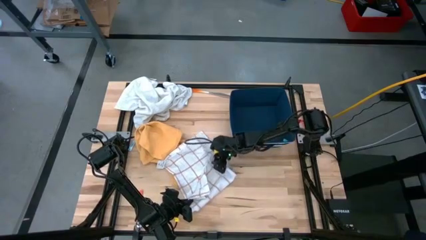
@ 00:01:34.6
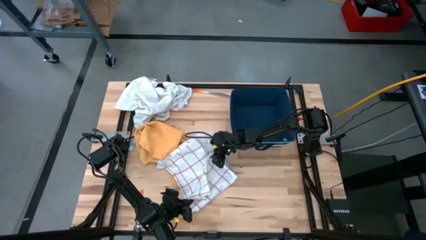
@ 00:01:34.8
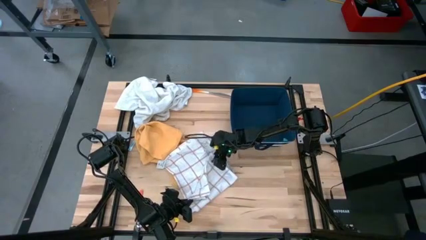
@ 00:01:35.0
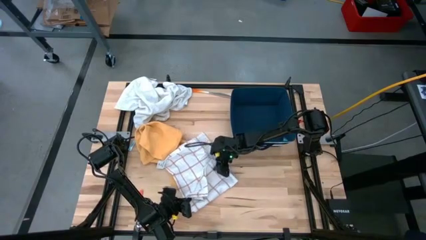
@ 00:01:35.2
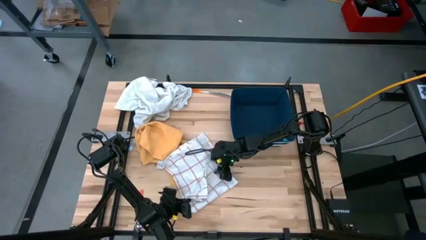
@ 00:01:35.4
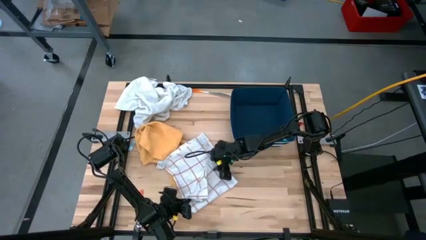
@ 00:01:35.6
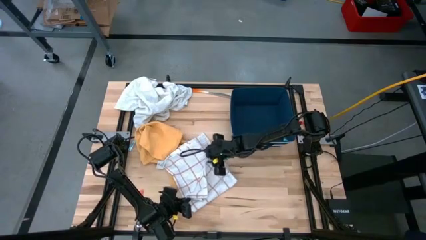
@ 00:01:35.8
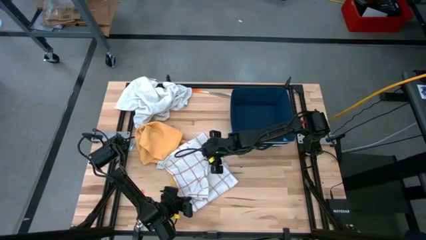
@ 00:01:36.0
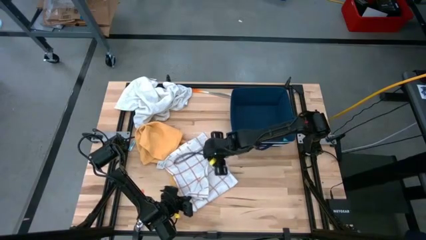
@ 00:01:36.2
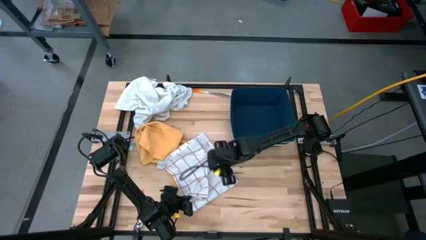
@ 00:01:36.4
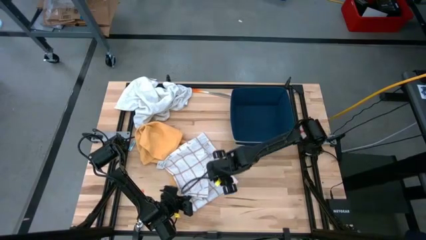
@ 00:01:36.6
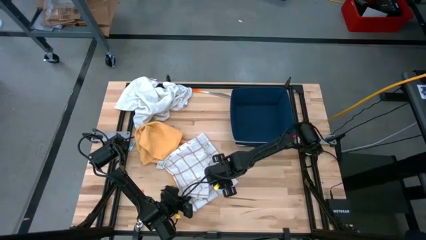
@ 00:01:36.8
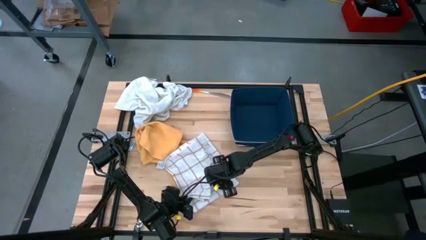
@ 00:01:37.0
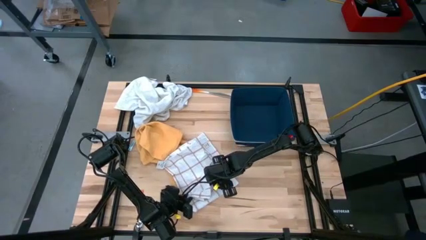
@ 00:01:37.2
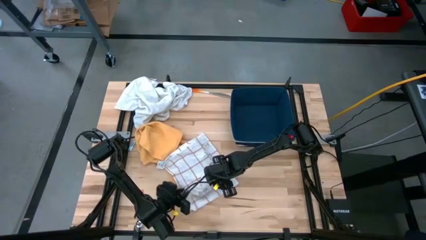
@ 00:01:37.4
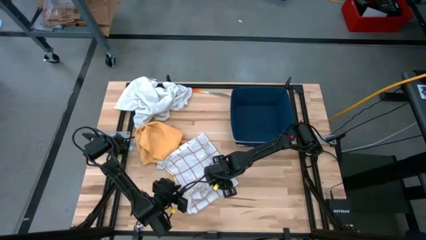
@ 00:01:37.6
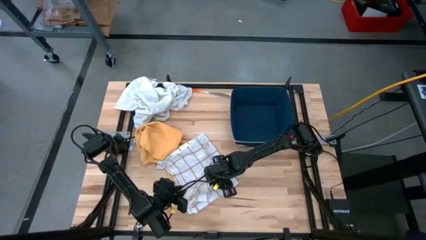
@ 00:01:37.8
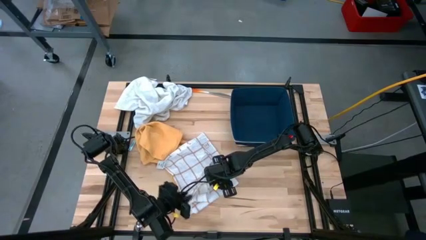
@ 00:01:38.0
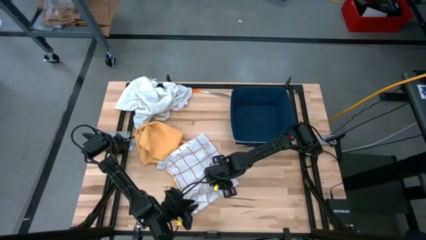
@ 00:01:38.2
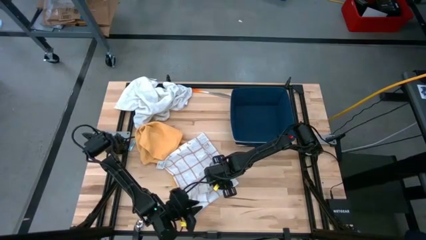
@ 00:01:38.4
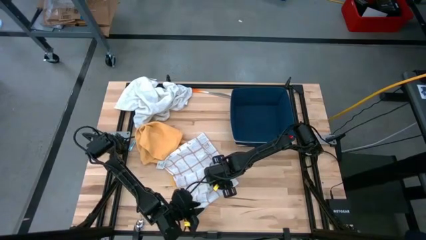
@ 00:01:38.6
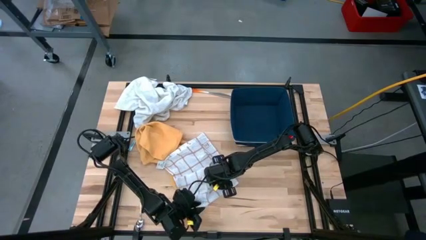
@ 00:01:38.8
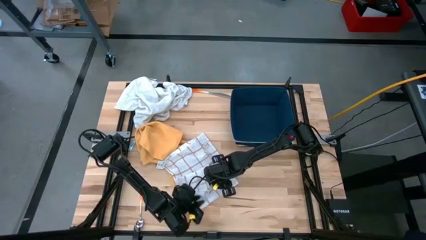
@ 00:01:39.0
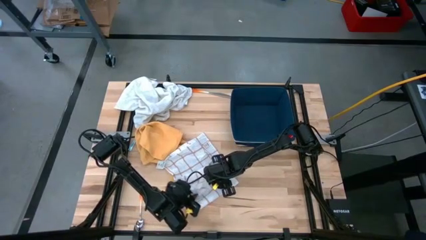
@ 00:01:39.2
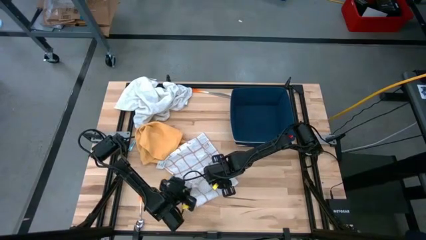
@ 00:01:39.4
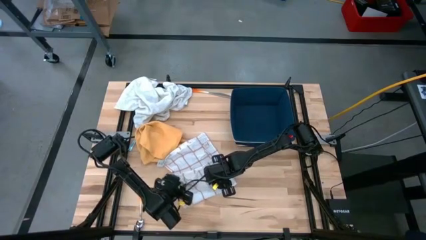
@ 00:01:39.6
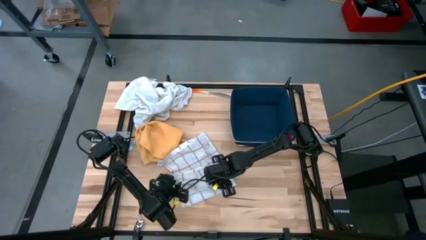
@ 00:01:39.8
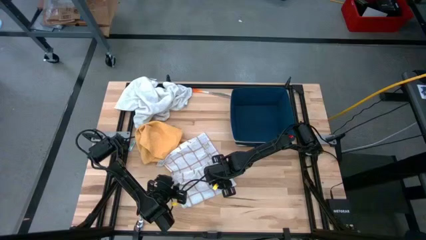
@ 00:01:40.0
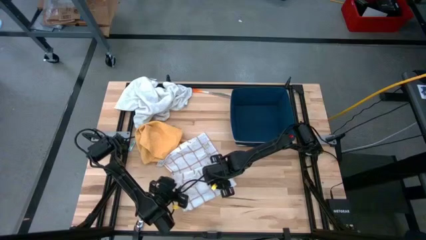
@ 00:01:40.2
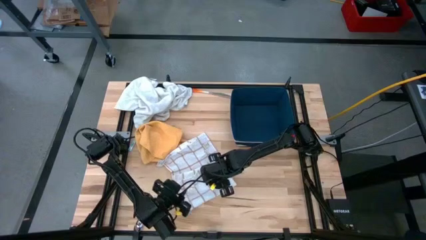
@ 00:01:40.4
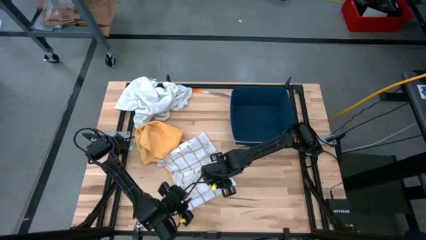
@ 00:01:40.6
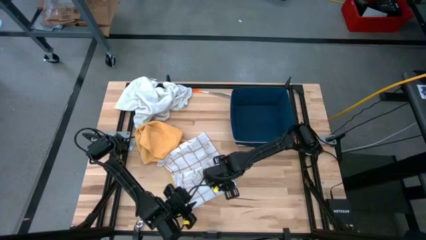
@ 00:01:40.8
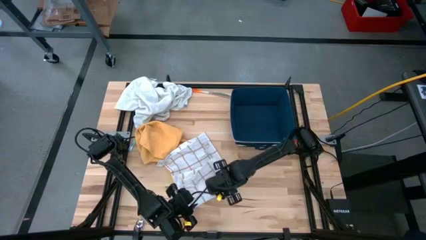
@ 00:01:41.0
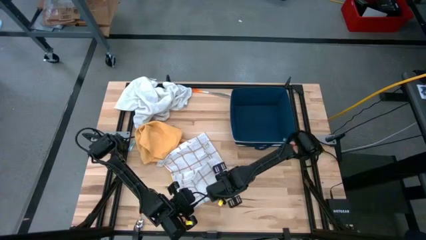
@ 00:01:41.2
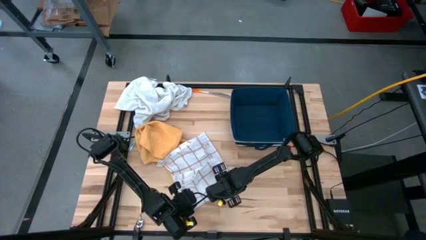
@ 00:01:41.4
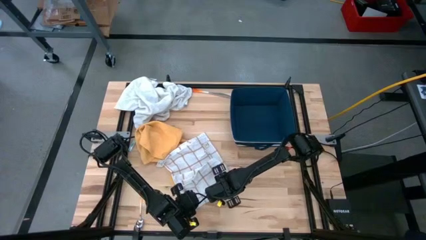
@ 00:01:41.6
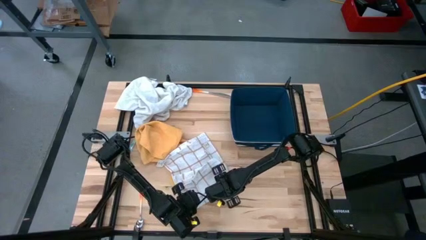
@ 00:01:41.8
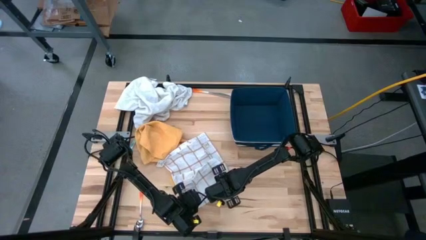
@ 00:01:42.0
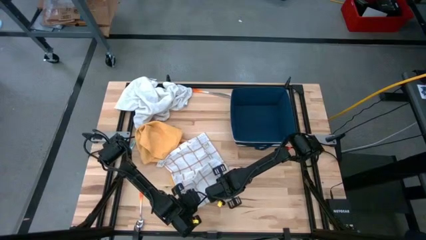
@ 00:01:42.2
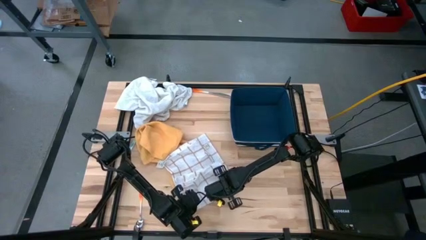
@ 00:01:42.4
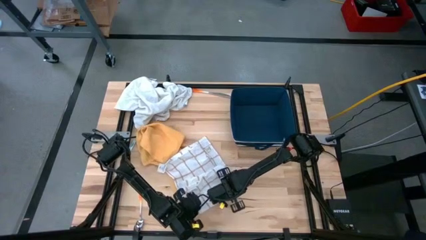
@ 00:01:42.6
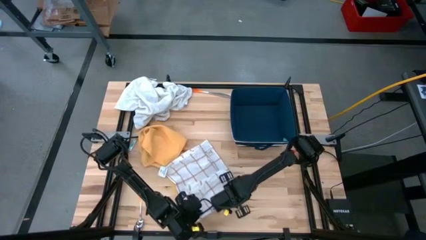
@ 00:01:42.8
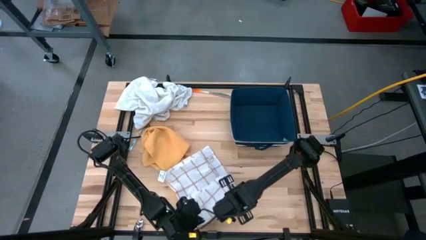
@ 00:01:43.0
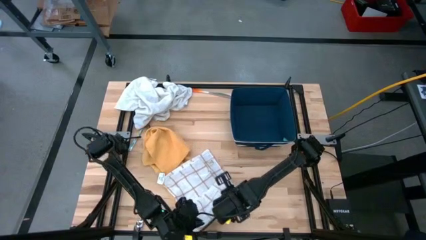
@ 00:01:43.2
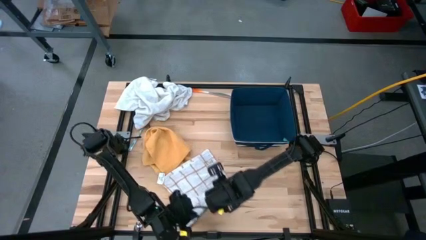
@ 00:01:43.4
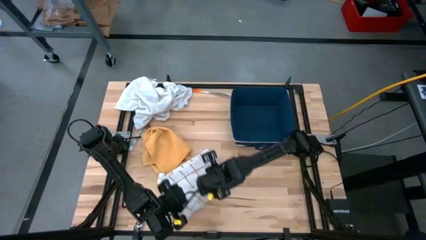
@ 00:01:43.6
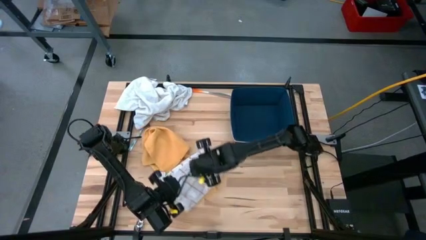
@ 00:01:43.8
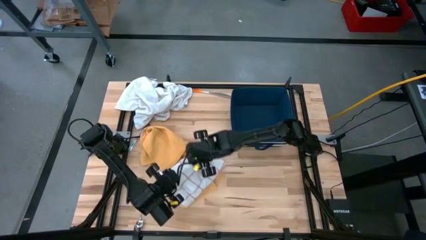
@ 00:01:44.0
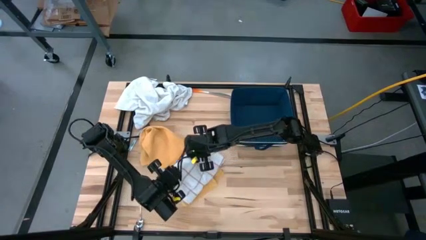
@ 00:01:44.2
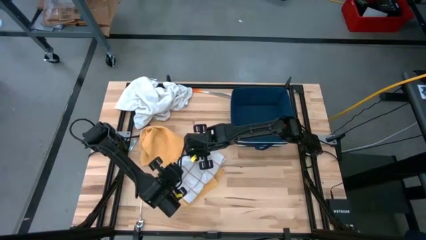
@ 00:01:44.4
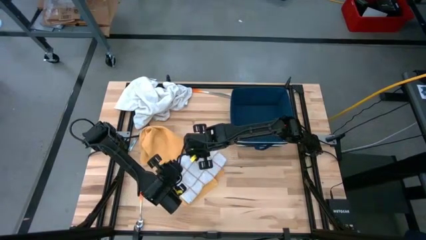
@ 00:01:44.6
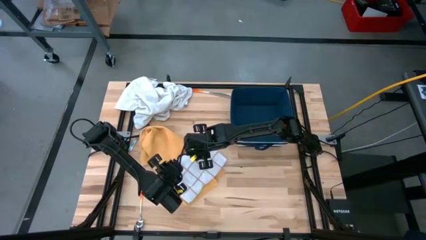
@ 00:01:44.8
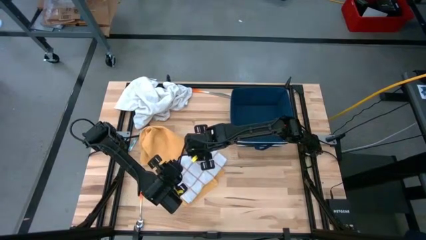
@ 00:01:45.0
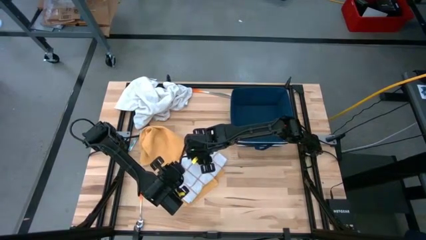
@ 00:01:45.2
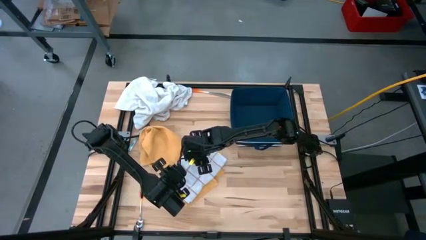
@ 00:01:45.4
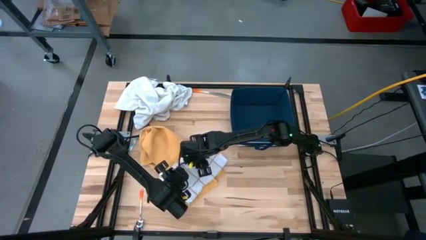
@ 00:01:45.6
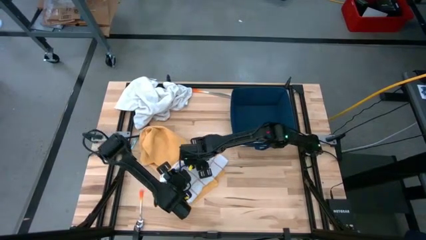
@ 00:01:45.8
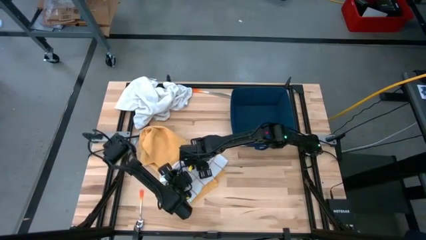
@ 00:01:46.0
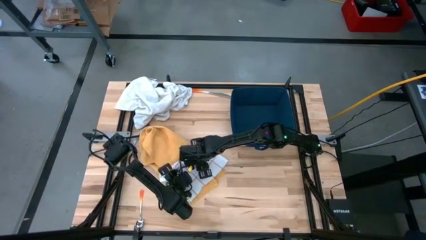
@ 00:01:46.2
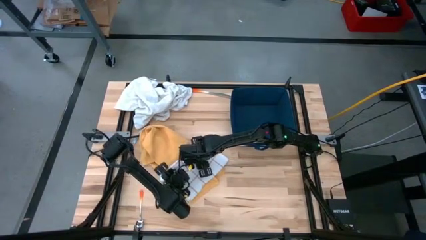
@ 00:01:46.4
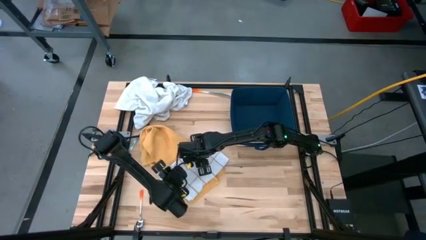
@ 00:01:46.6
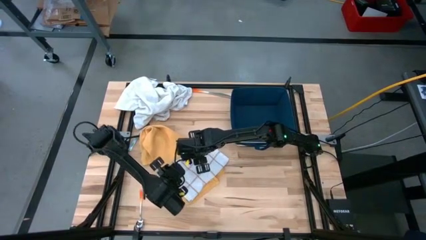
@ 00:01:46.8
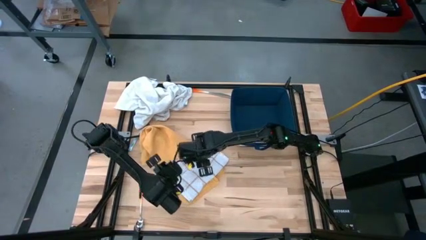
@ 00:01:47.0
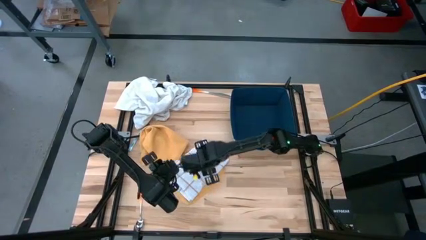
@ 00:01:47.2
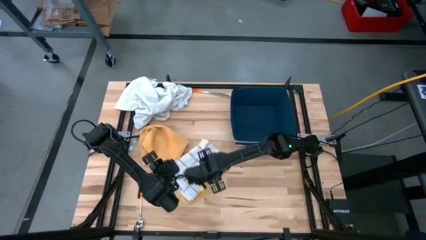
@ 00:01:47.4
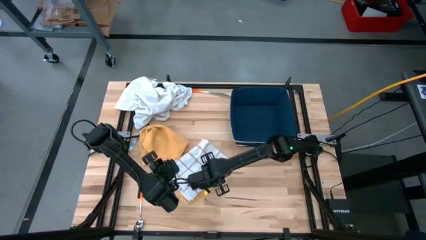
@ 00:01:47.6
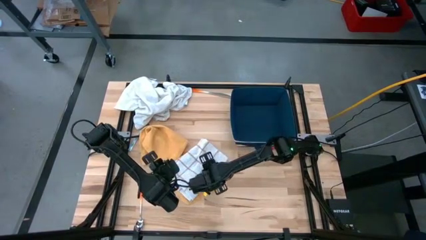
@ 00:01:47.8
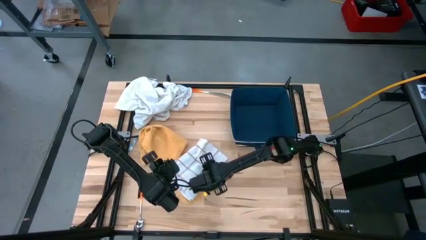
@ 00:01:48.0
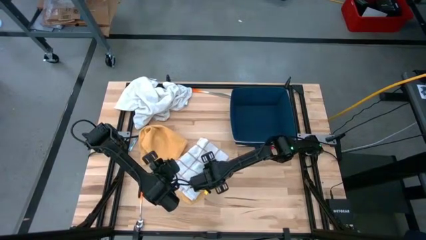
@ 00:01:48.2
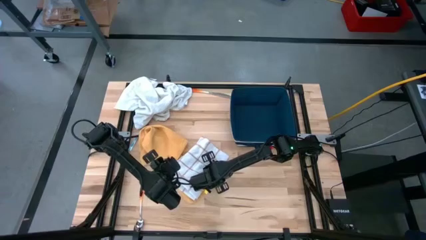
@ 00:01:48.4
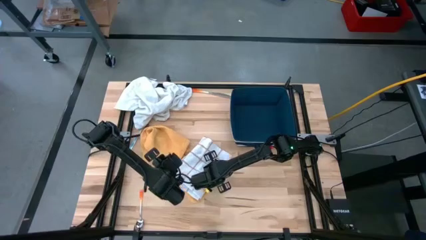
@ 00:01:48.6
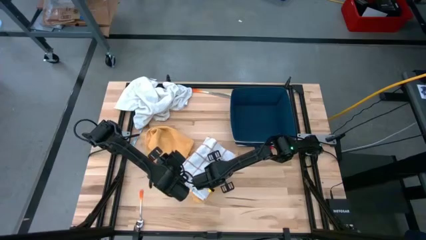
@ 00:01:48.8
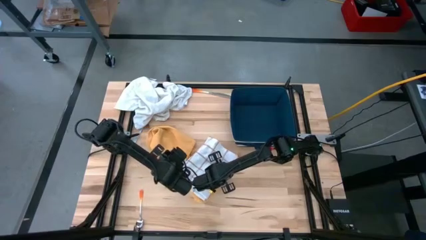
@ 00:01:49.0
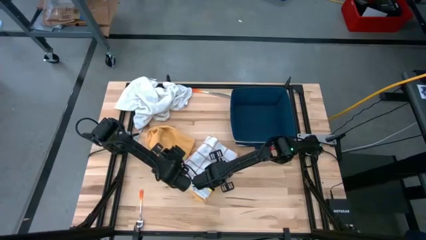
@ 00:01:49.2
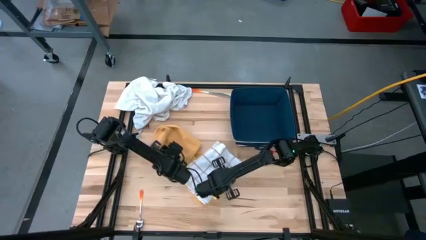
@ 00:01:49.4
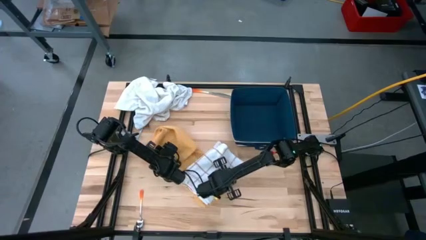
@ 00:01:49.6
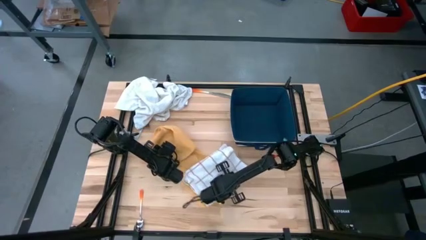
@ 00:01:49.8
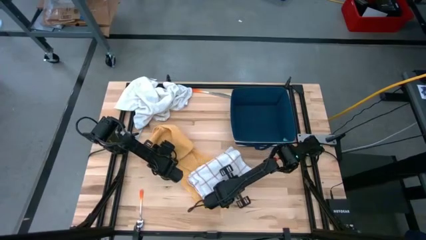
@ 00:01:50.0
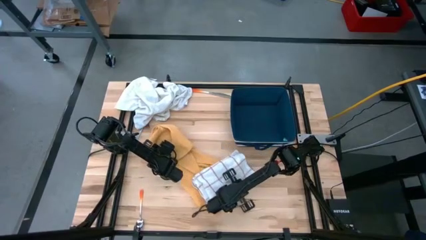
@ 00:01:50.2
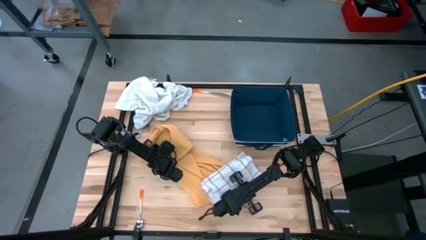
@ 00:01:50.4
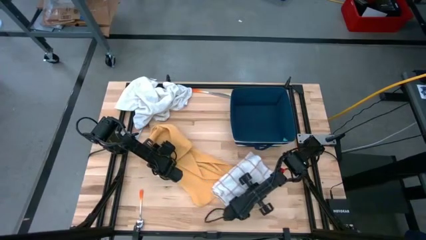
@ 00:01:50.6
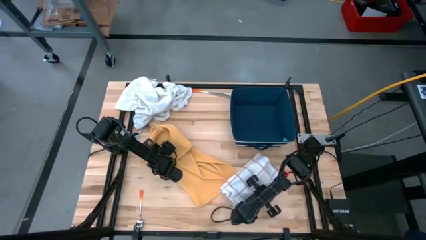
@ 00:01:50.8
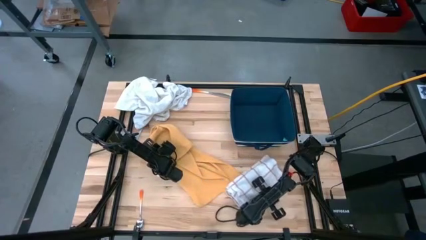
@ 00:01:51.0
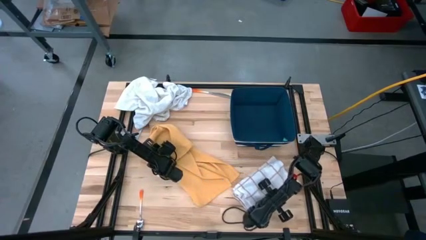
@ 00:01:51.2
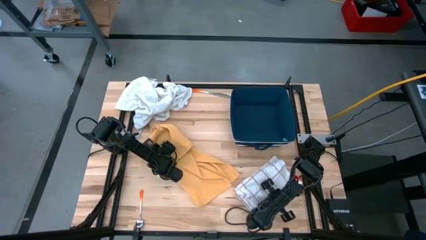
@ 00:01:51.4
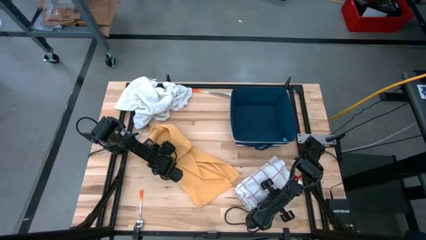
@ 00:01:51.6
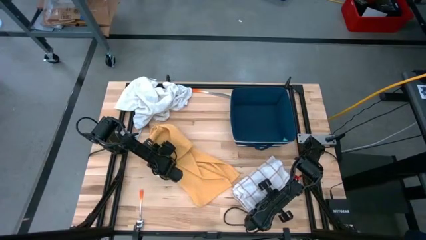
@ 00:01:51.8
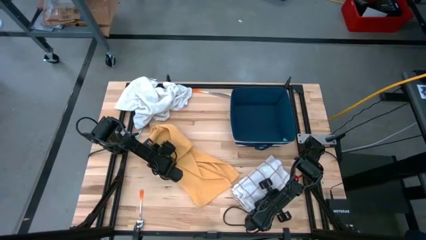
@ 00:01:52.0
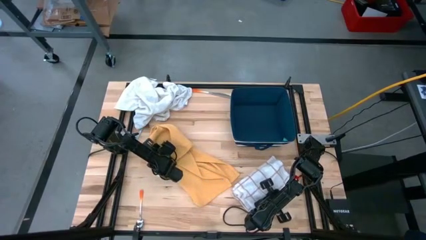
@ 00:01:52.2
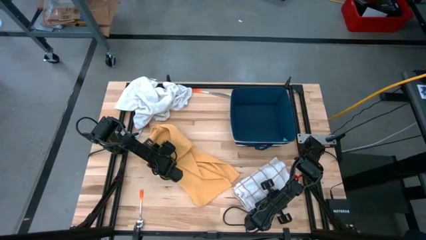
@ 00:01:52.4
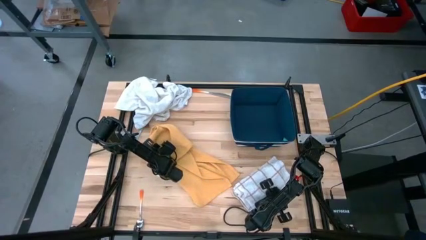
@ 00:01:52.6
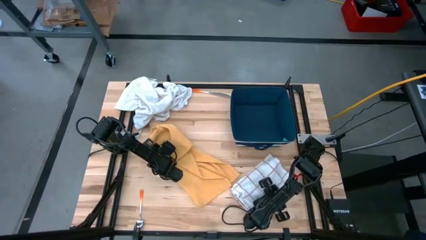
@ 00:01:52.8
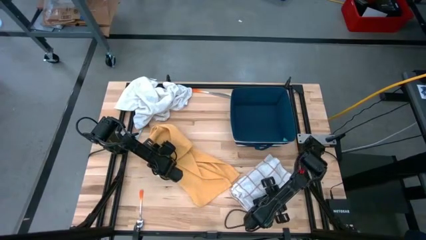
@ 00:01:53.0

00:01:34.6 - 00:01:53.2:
Task: Fold towel
Fold the white-and-brown checkered towel
